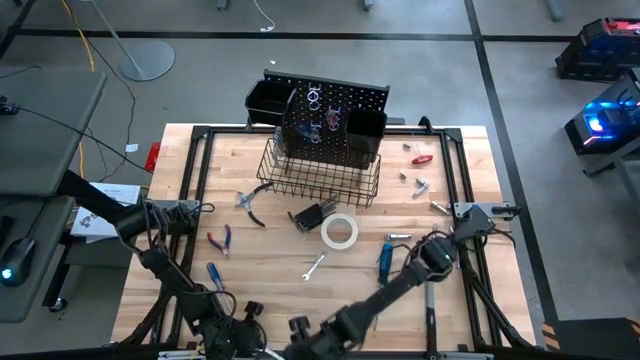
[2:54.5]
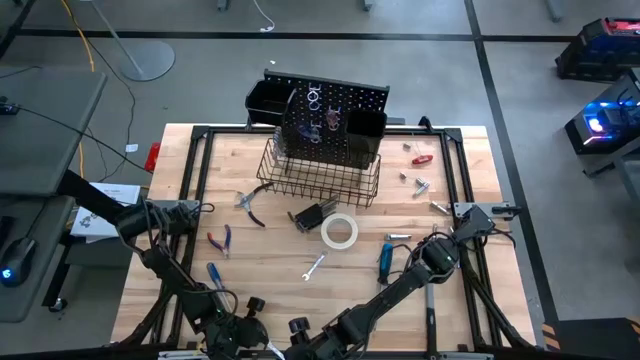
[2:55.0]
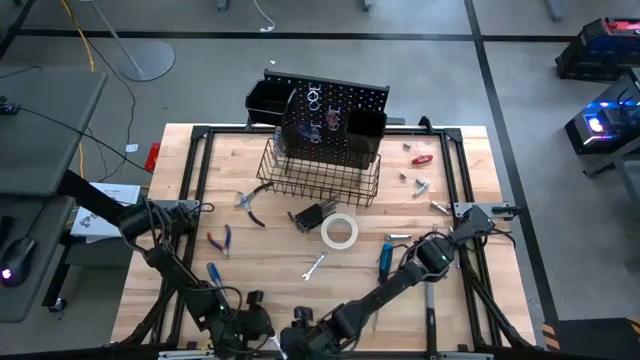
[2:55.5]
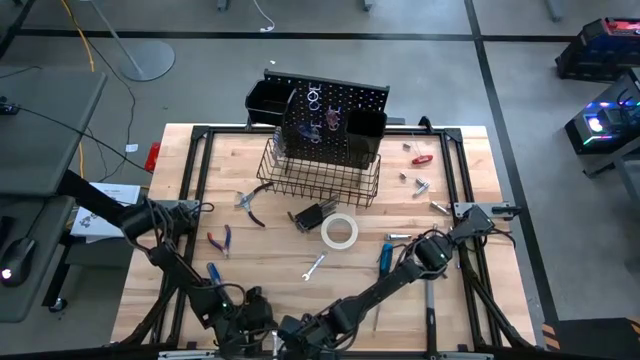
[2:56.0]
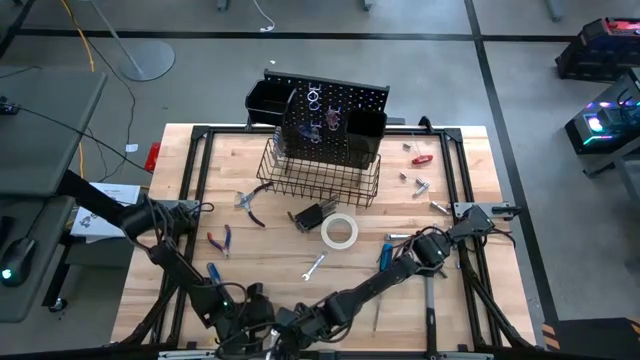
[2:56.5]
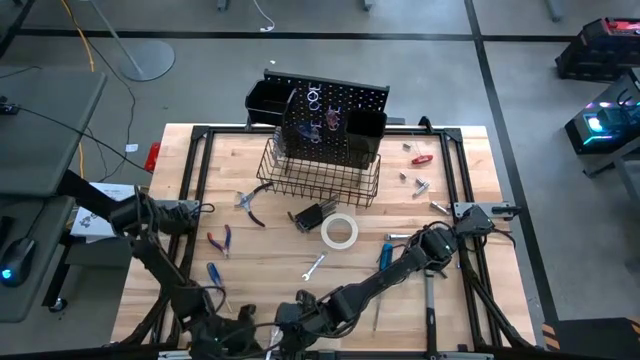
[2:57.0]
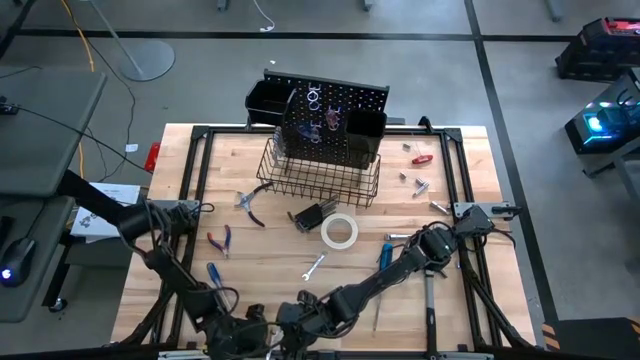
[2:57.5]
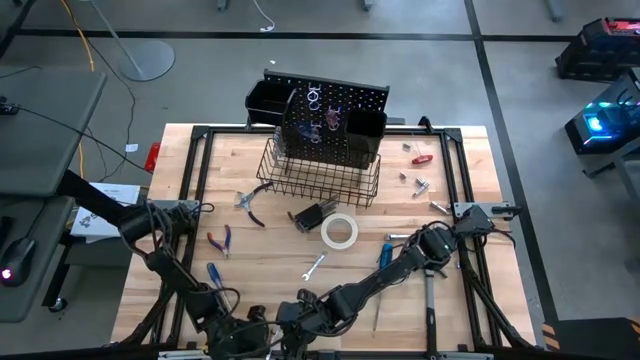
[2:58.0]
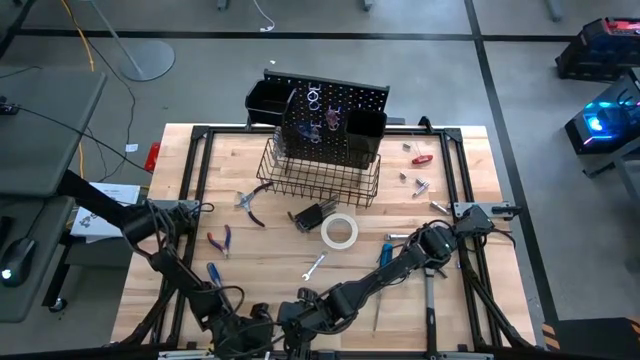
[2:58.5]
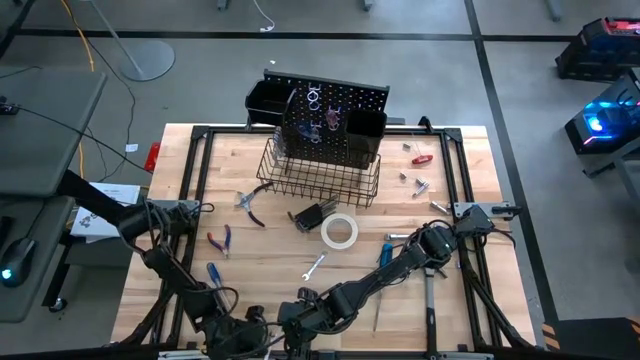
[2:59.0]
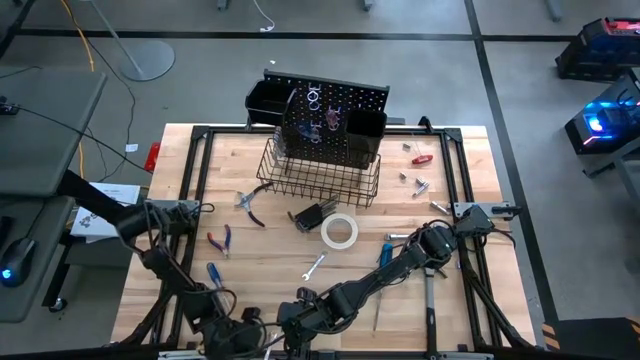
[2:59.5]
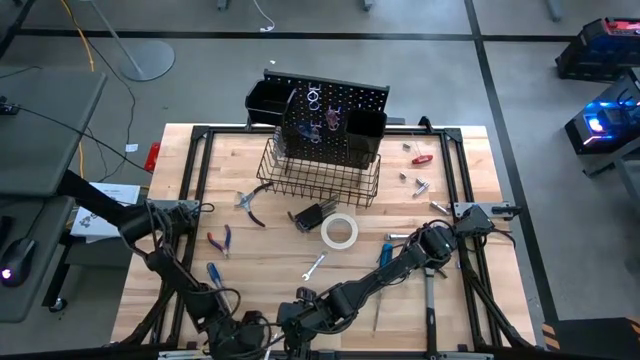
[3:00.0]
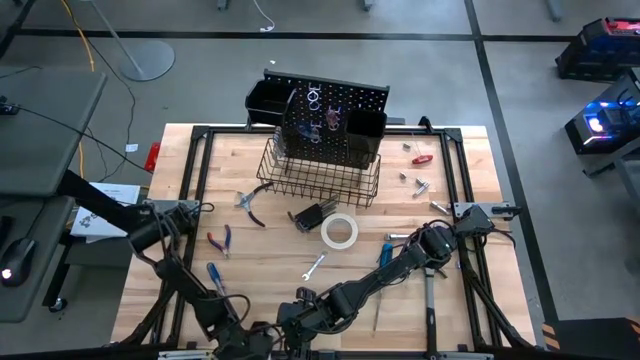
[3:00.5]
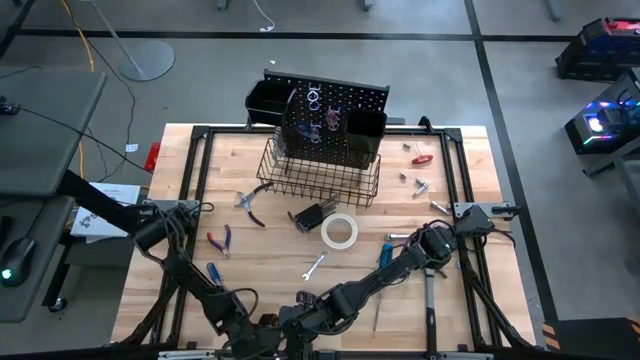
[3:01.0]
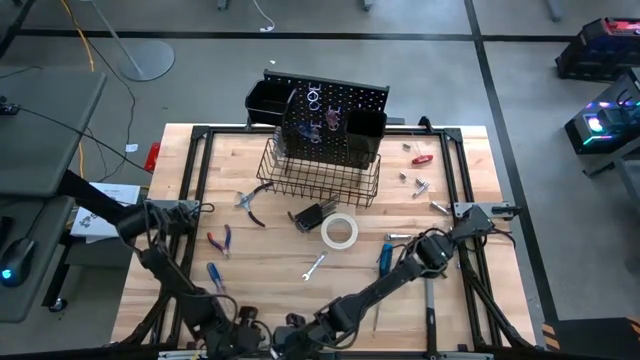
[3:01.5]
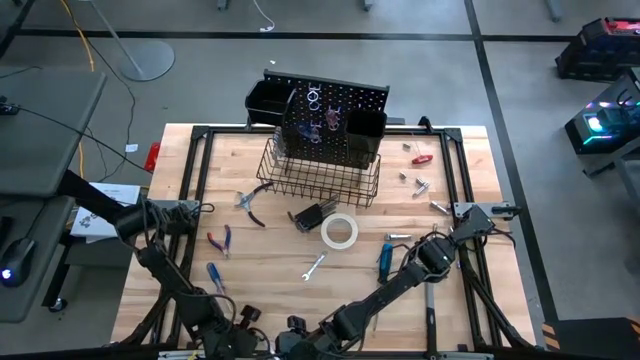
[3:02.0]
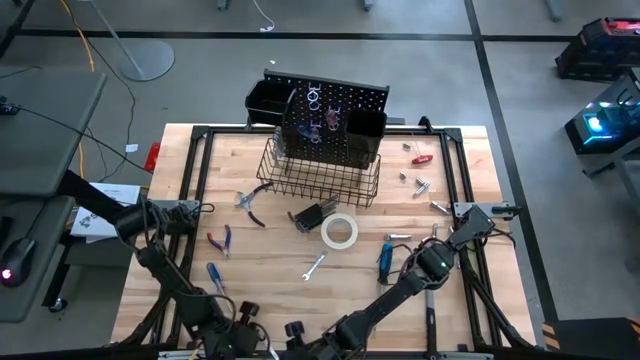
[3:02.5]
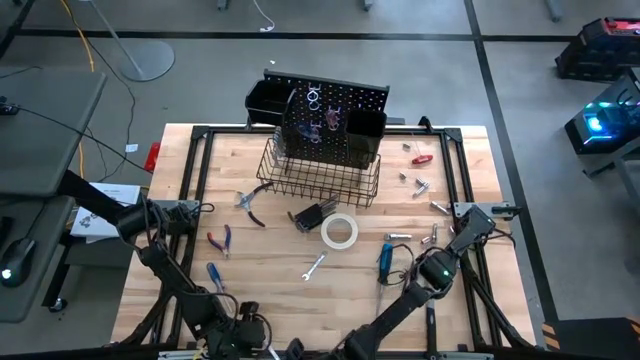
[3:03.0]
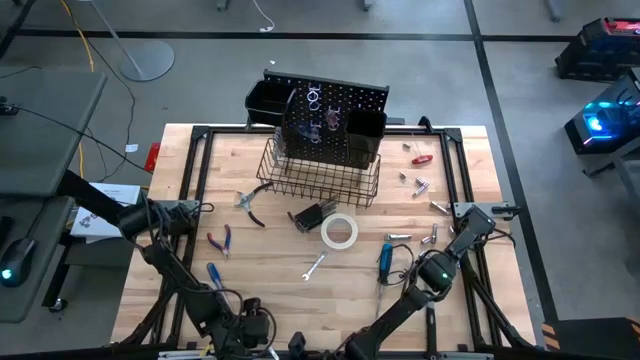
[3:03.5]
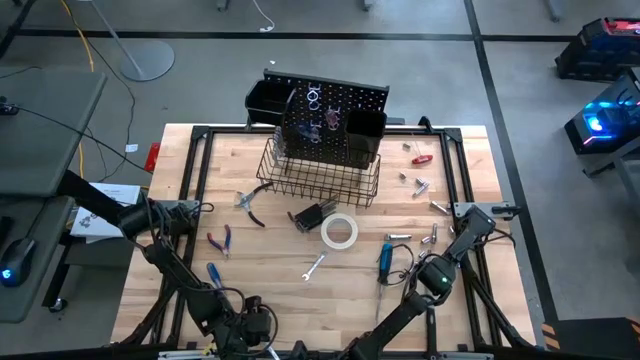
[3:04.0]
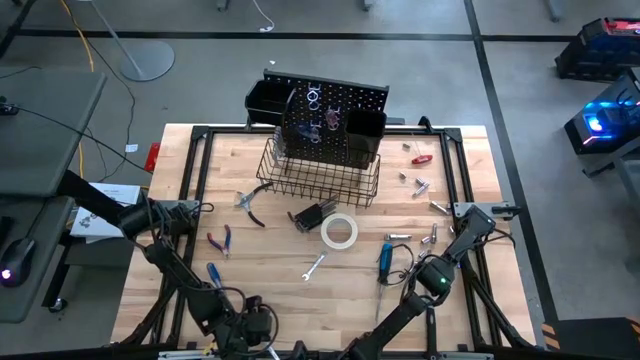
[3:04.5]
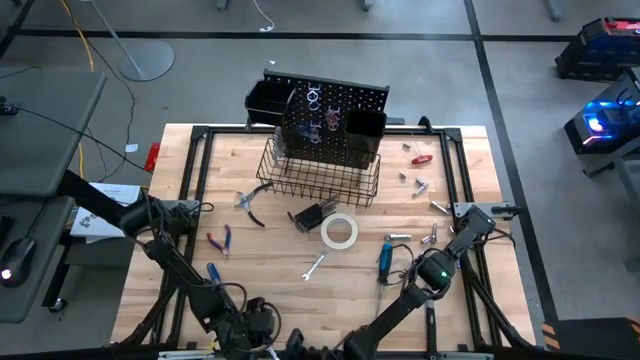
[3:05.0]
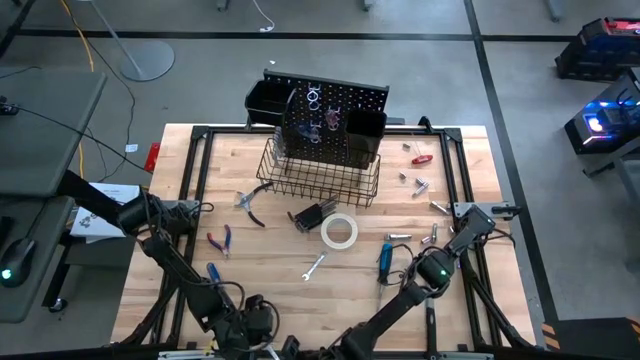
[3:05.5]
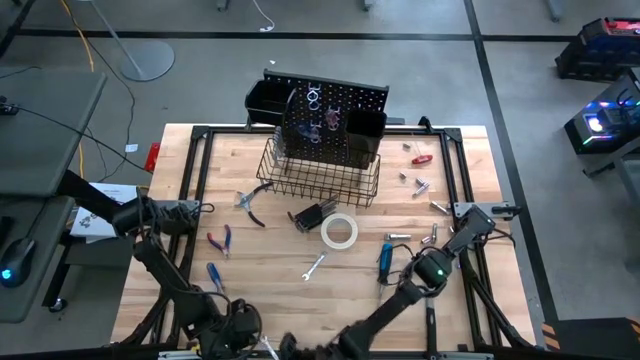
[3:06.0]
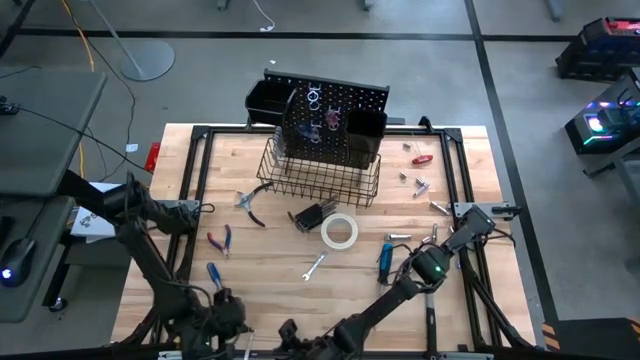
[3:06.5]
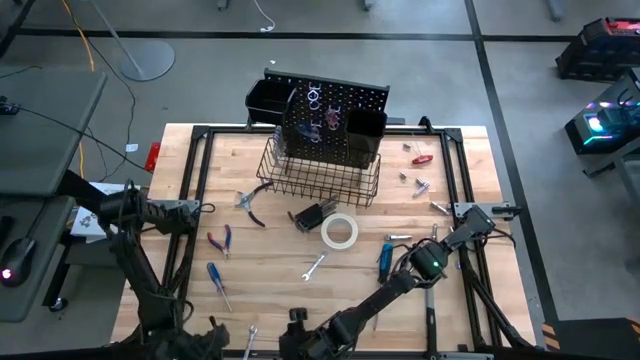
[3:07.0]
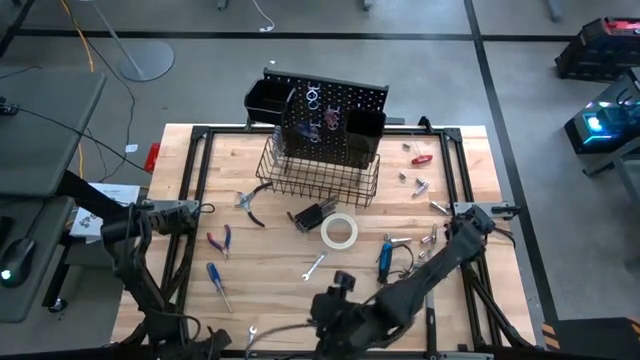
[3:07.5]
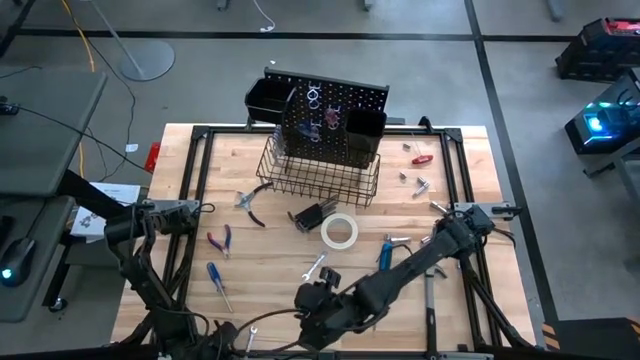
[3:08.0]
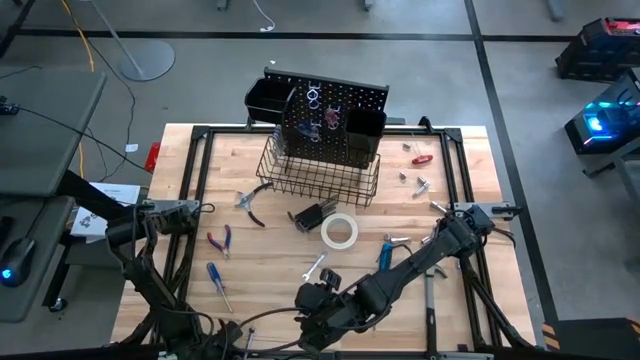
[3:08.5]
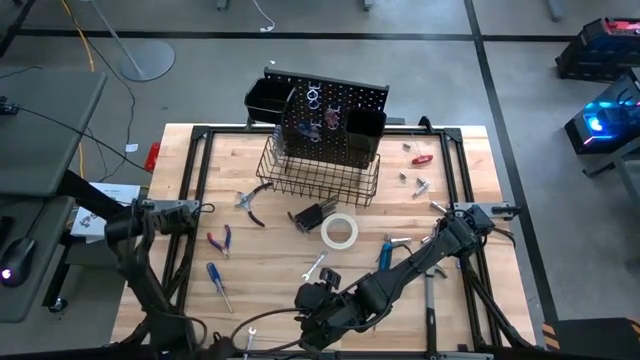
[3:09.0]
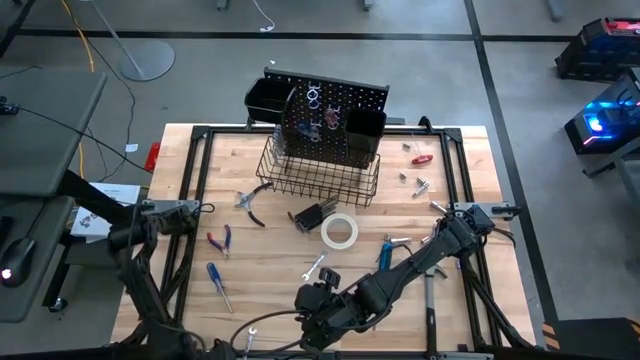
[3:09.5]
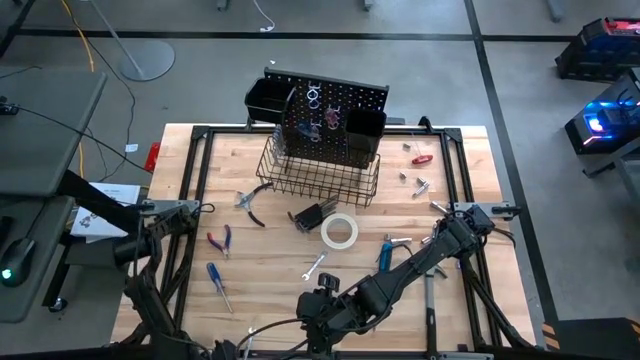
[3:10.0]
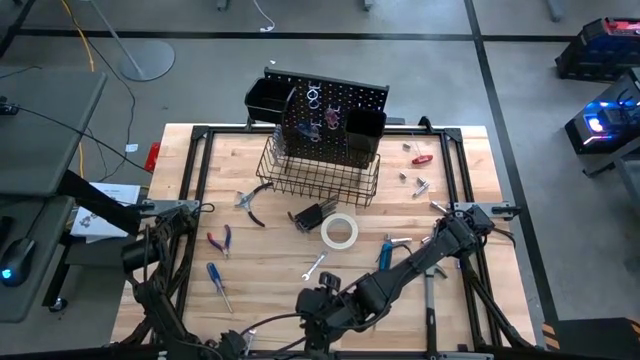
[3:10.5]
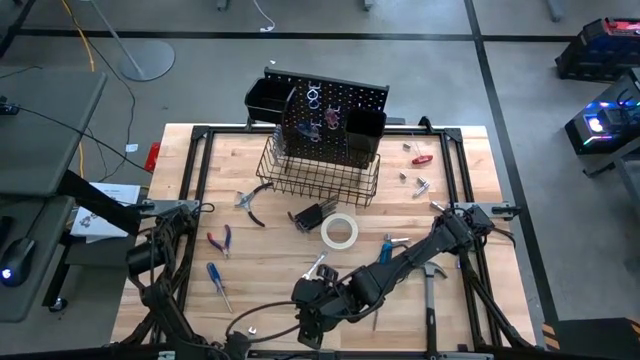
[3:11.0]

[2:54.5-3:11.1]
Task: Hang tools onto peg board
Hang the wrench on the peg board

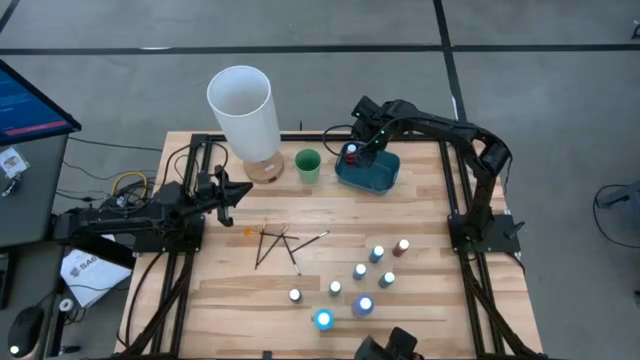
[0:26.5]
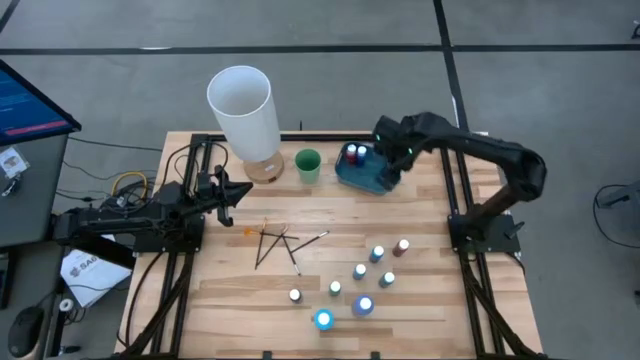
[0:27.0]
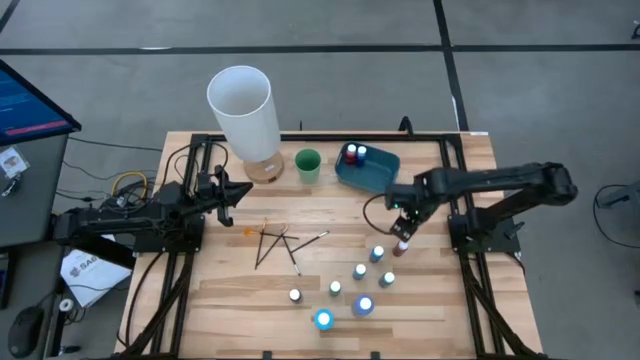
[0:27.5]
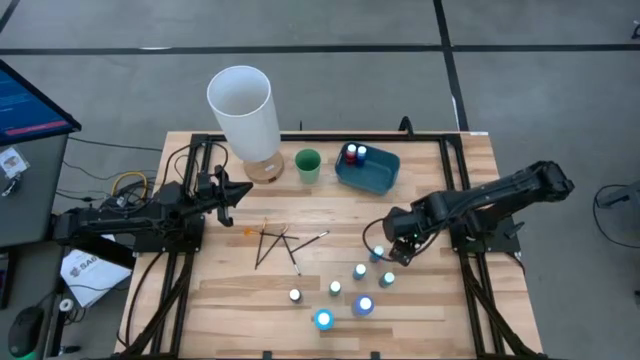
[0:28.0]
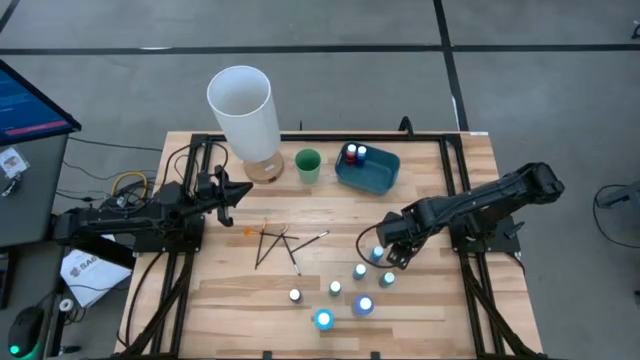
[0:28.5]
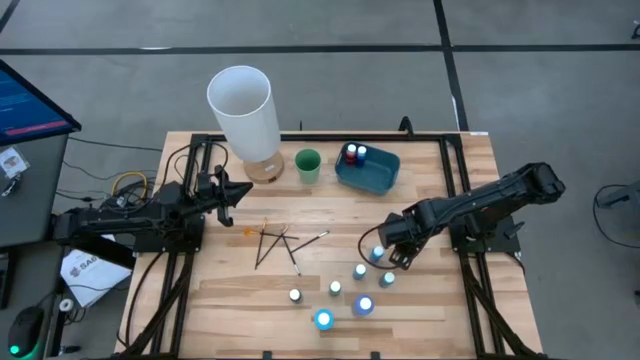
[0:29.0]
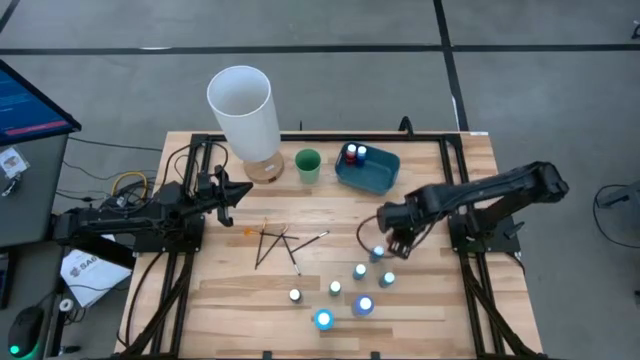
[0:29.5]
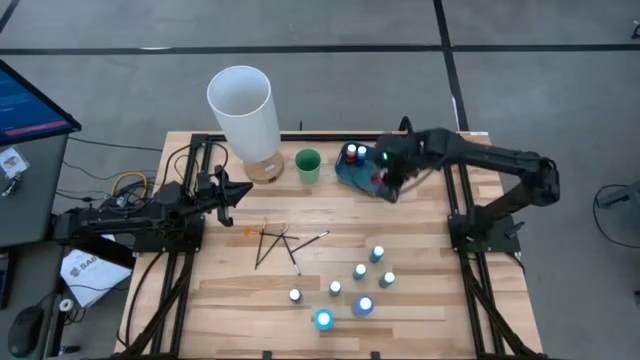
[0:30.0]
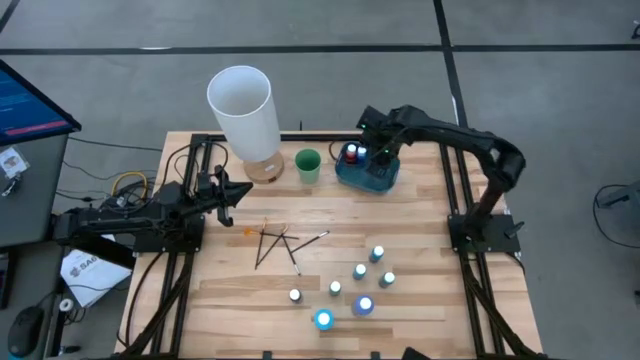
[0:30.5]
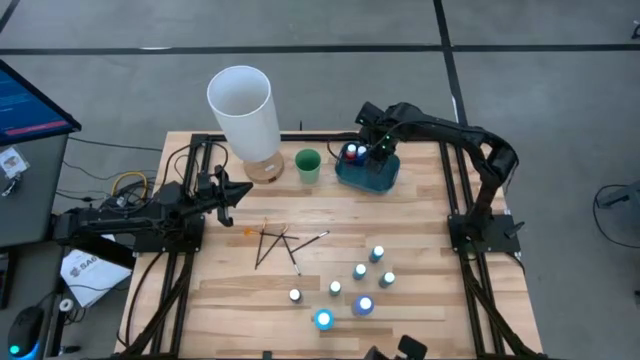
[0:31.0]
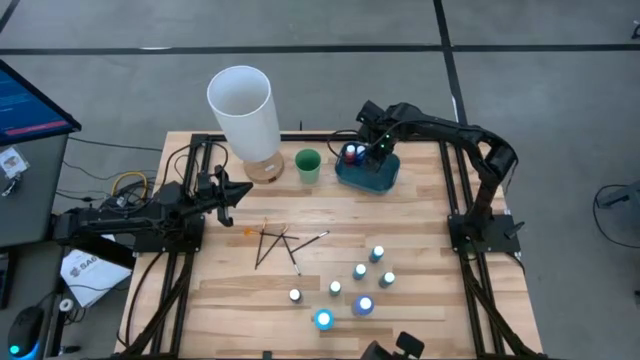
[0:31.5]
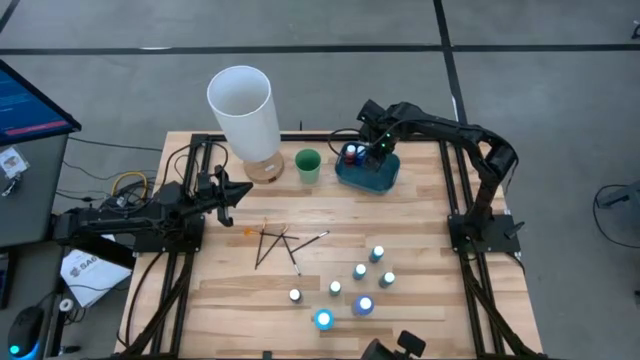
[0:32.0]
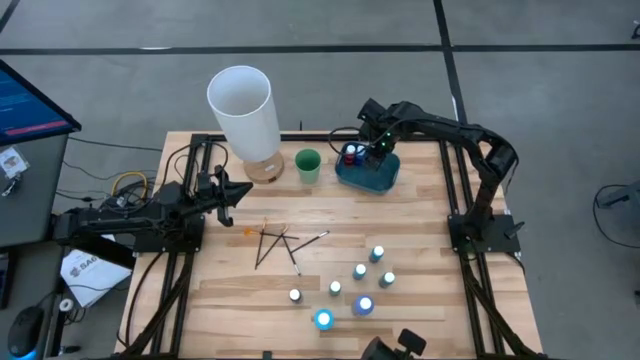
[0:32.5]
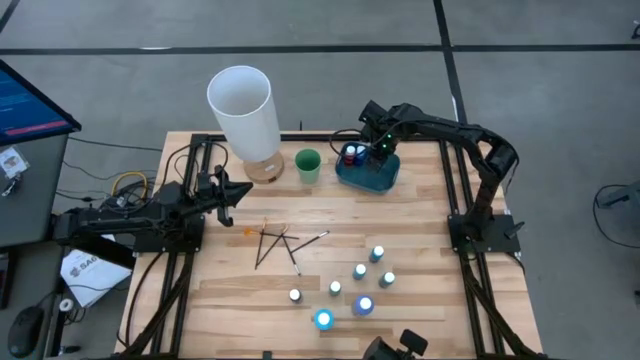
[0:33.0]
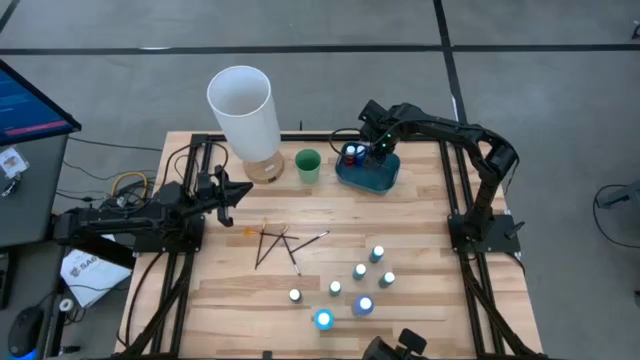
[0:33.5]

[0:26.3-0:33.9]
Task: Pick & Place Paint Supplies
Put the red paint bottle into the blue bin
